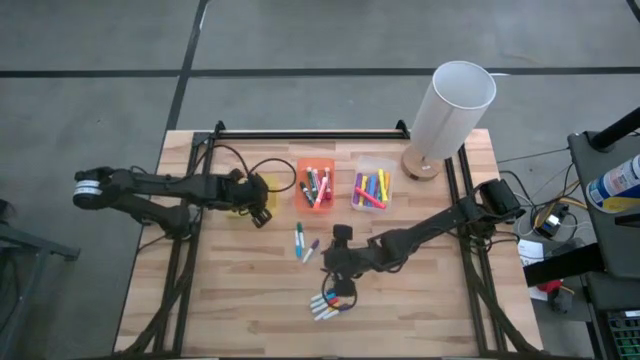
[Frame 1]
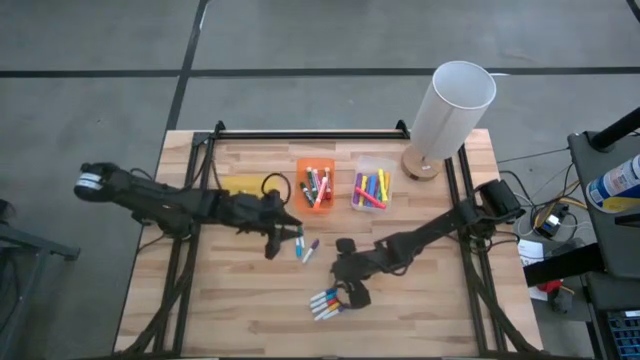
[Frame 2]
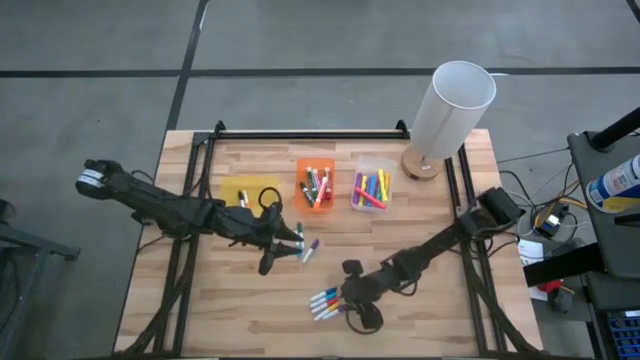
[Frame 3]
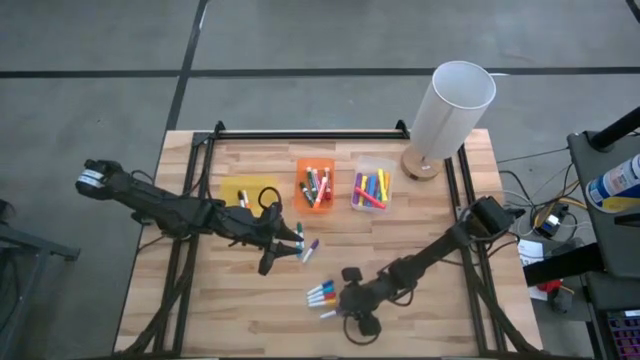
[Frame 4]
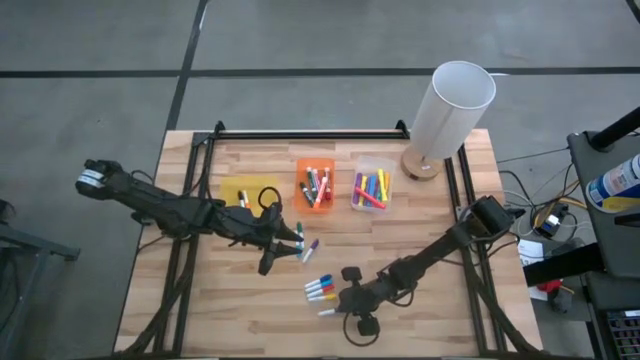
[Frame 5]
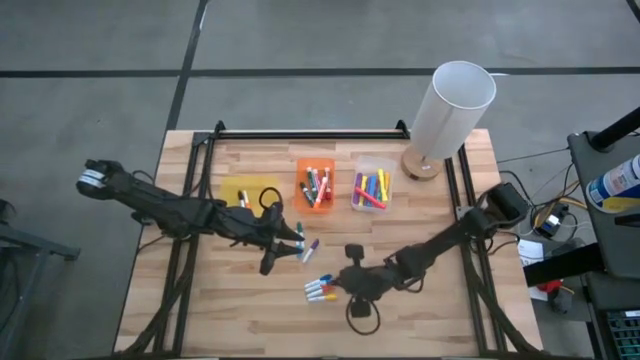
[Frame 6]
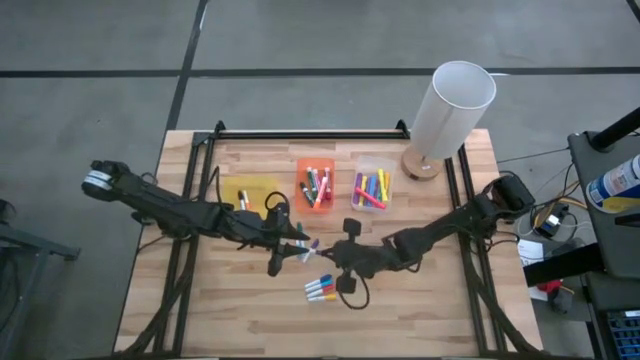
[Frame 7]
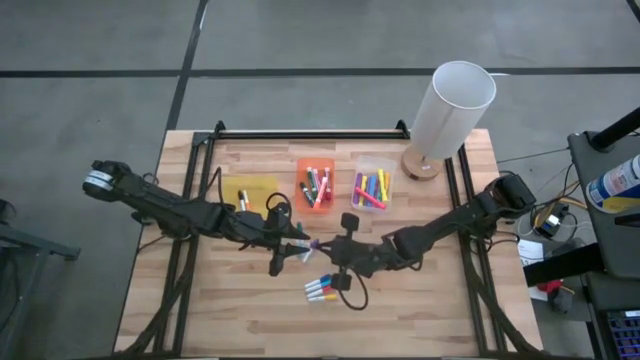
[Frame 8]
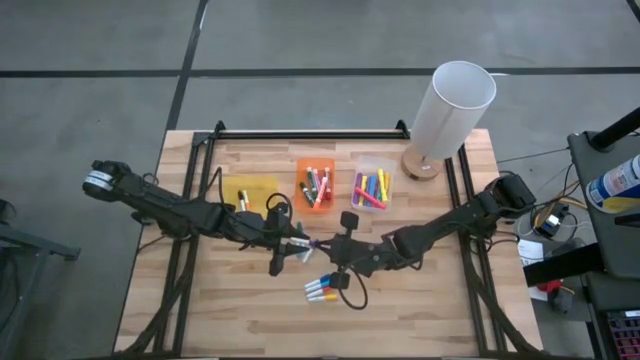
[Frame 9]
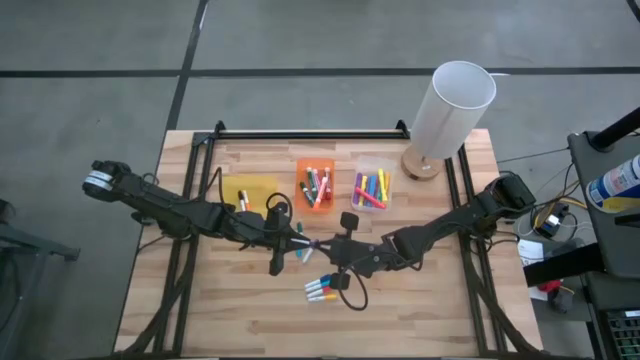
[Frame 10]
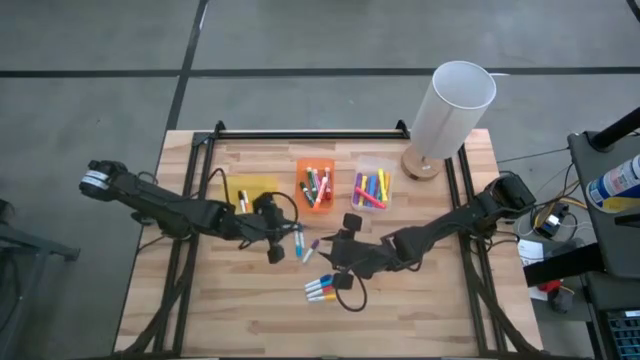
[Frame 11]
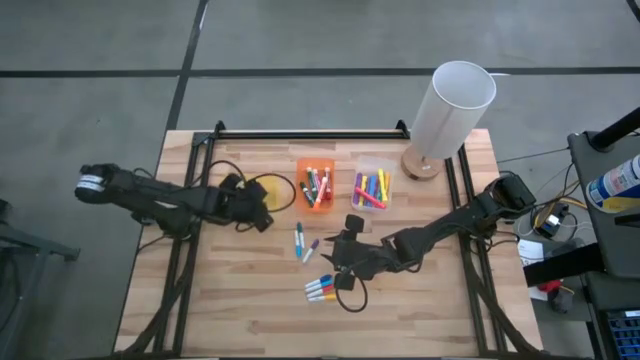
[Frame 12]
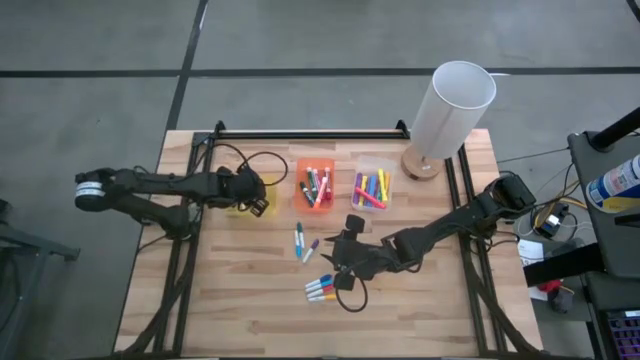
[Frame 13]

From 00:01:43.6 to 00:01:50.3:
Task: Pick & Place Markers
Put the bottom small purple marker into the yellow bin

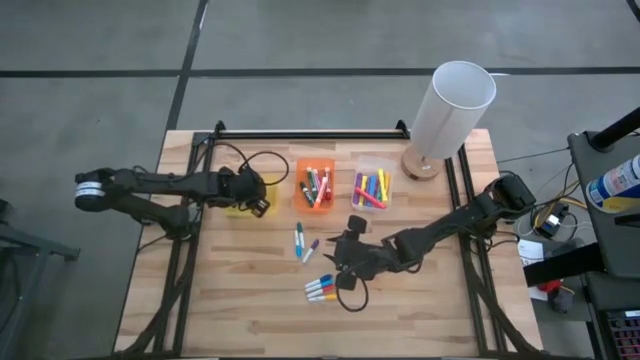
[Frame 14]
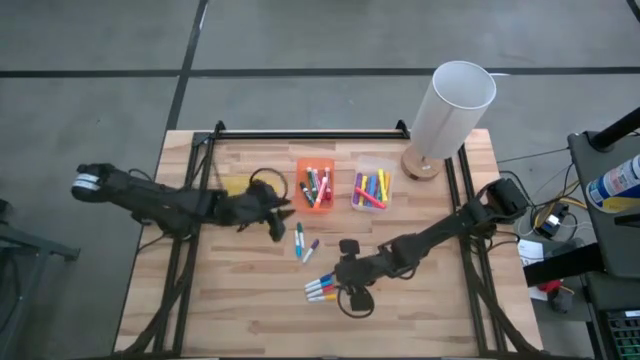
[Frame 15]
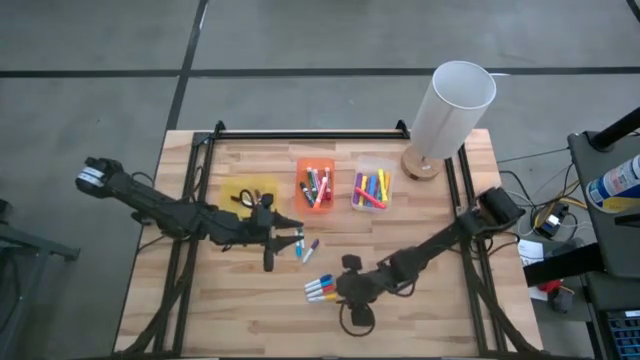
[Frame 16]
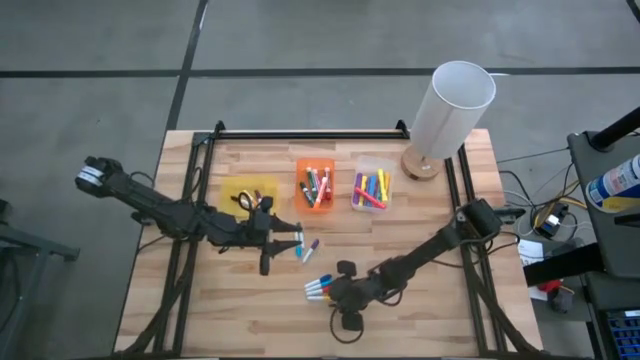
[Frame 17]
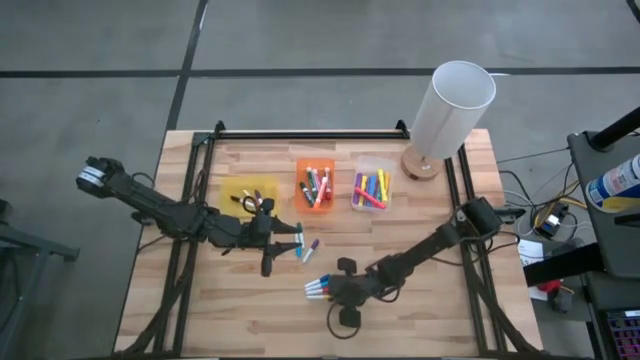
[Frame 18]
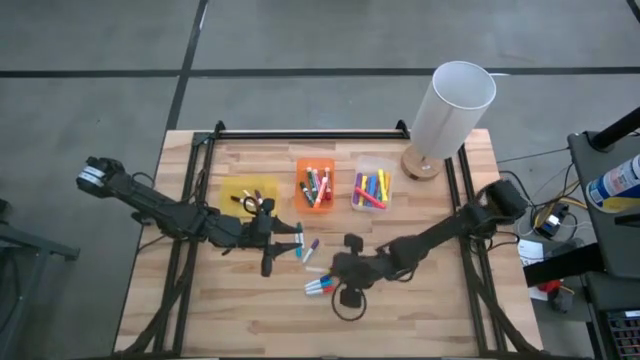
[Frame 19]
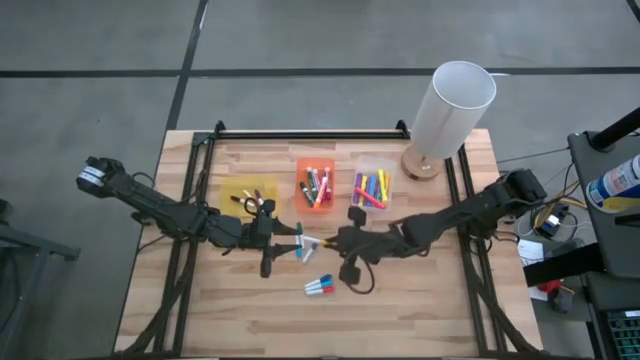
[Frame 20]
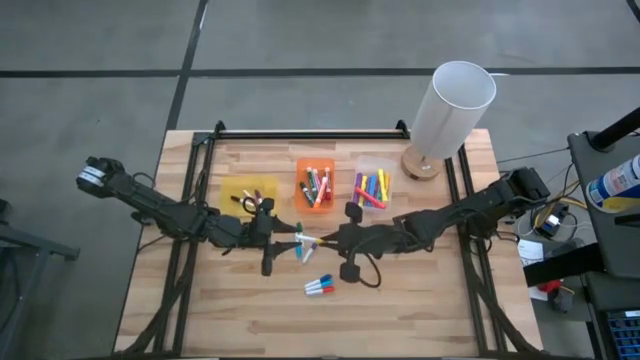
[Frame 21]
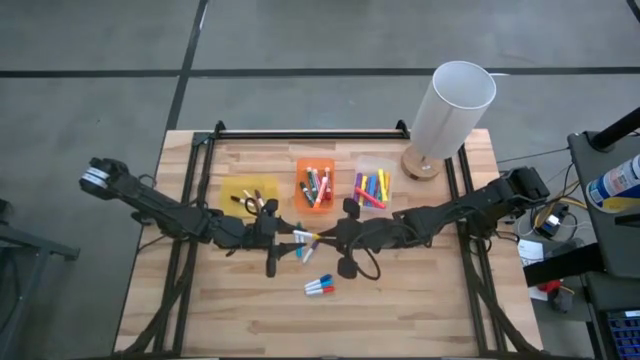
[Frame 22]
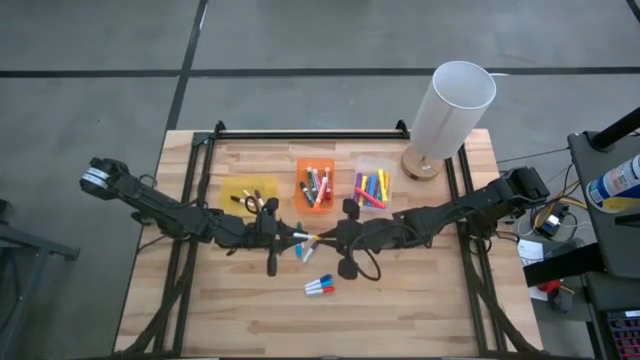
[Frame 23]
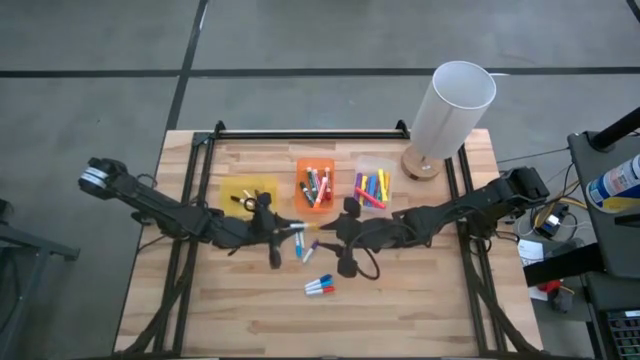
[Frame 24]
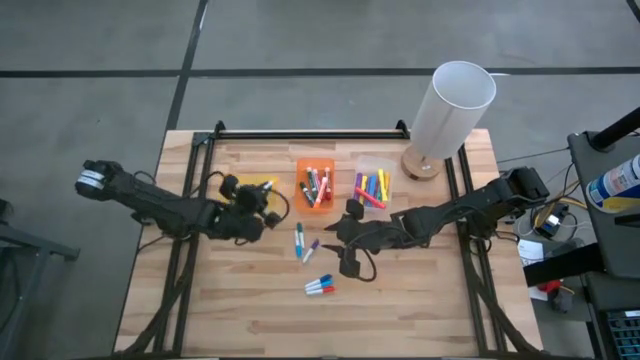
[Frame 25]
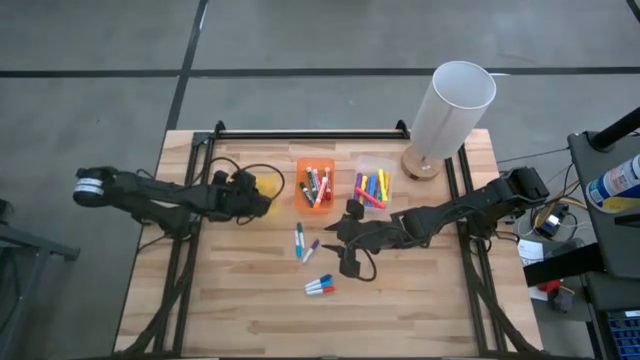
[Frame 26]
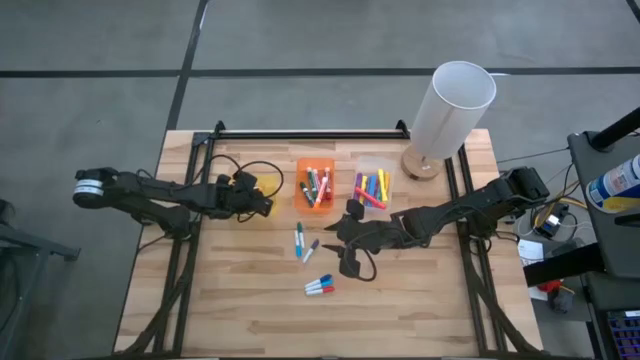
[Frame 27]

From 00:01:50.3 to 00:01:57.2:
Put the small yellow marker into the transparent yellow bin

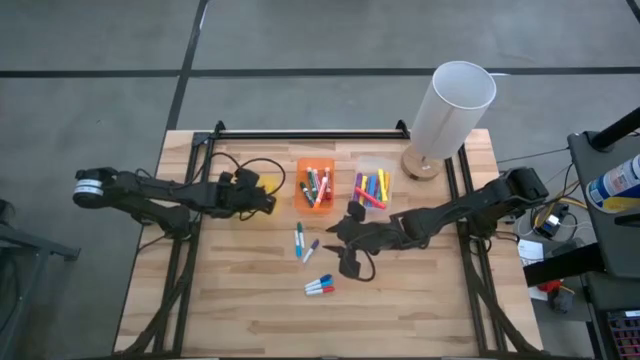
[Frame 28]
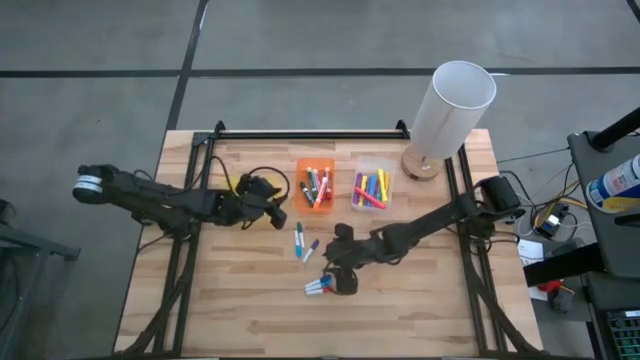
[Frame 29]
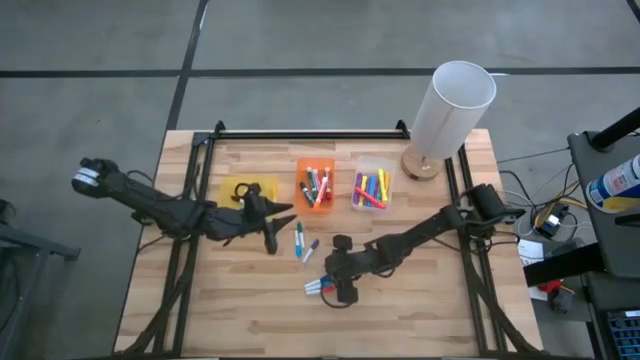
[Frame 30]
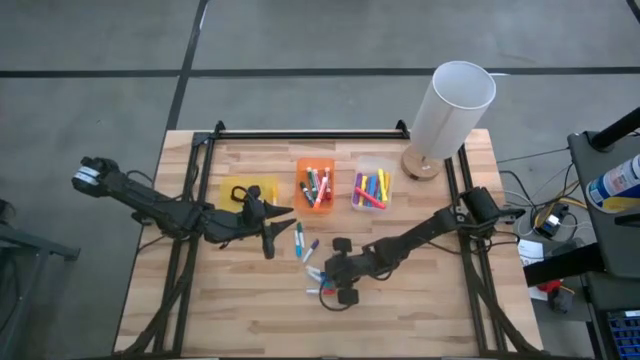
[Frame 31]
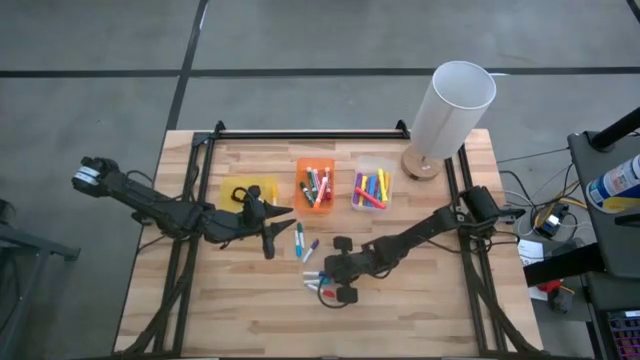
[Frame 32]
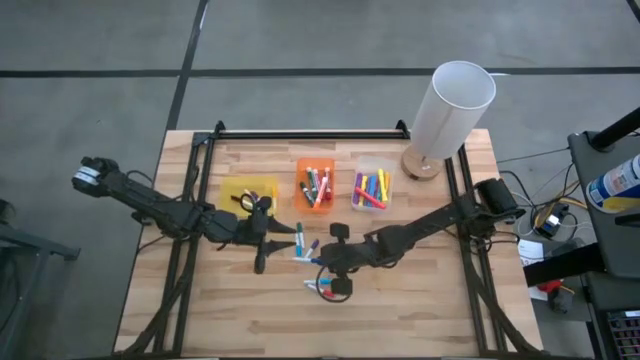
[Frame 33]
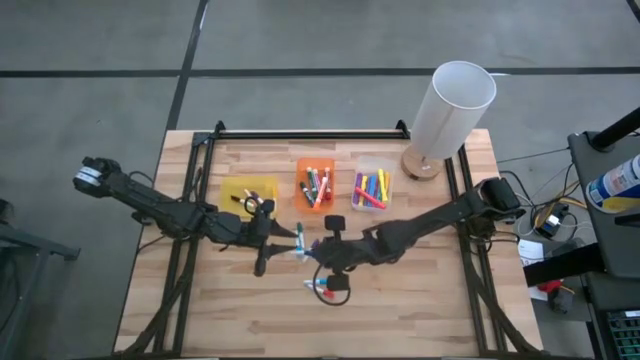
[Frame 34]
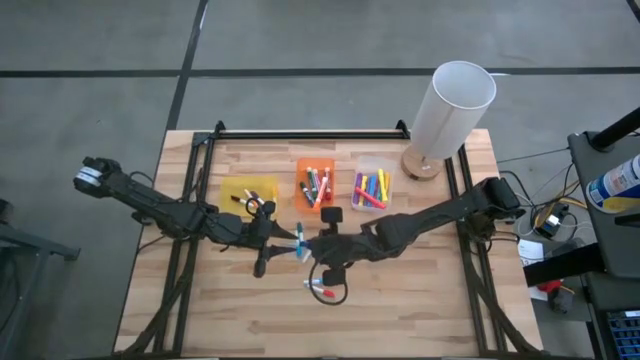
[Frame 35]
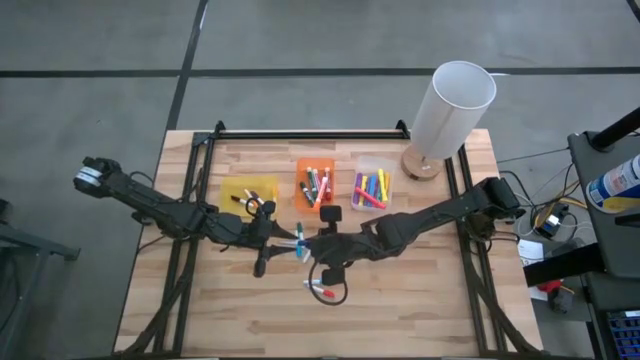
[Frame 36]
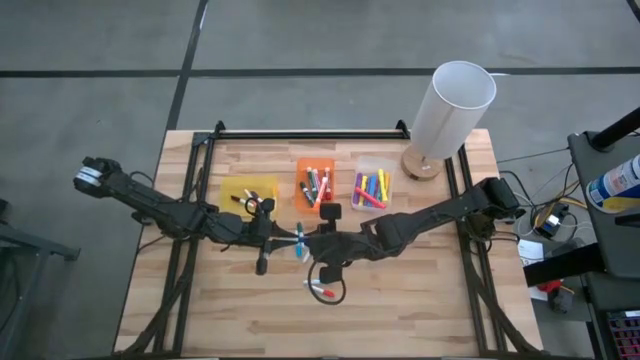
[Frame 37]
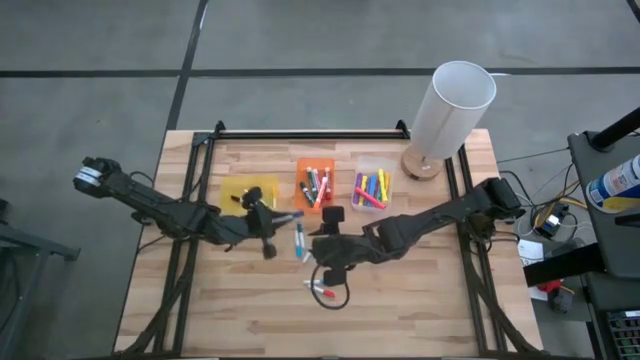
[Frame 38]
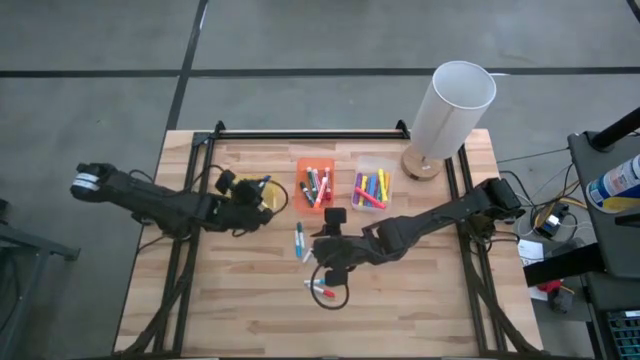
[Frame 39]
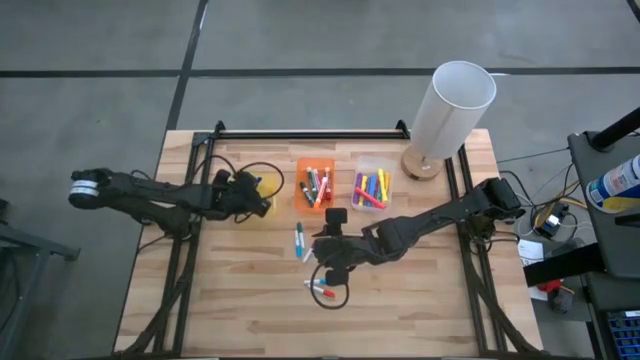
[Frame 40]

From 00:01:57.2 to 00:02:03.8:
Put the small blue marker into the yellow bin

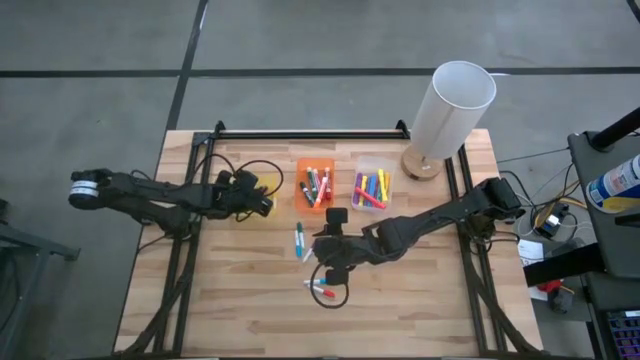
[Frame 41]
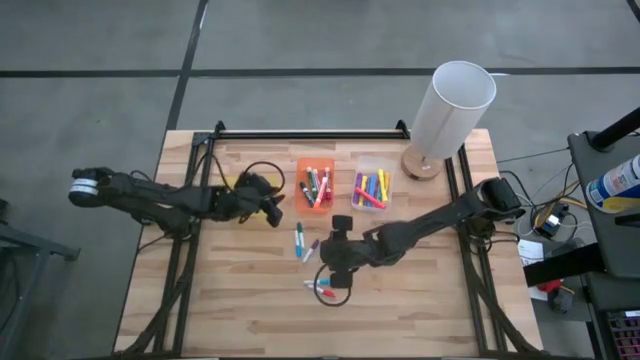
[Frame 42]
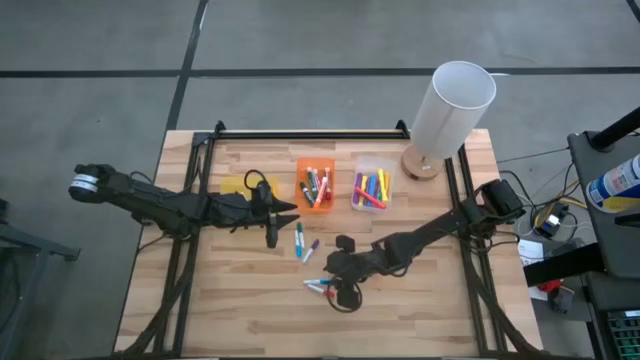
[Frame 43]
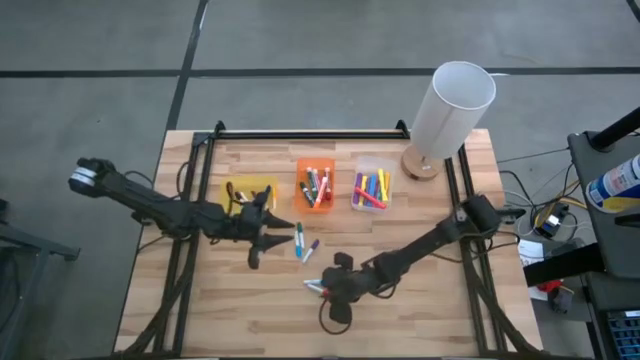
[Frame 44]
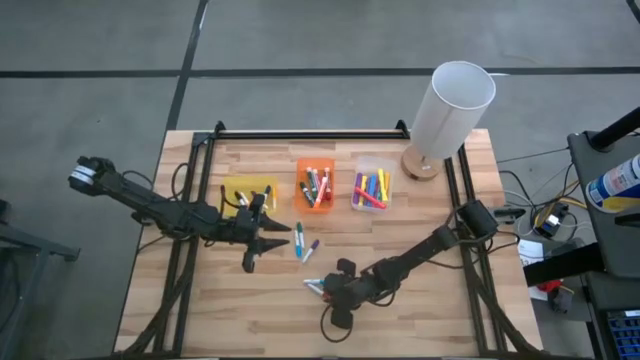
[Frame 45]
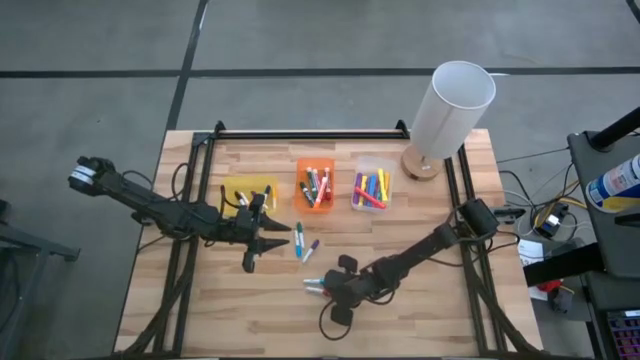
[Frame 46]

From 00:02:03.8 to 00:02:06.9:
Put the small red marker into the yellow bin
